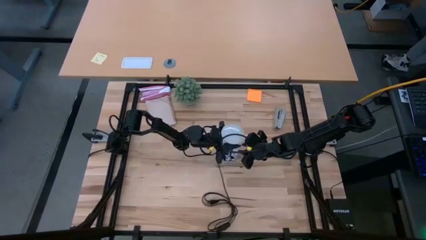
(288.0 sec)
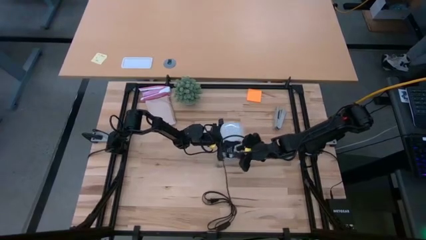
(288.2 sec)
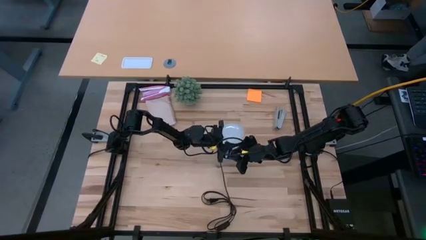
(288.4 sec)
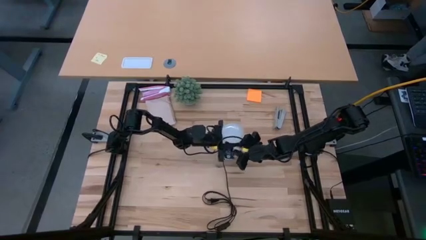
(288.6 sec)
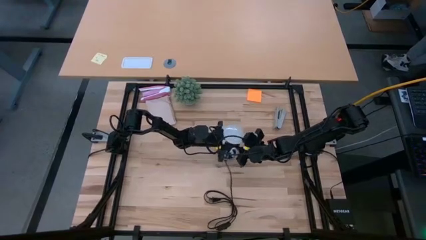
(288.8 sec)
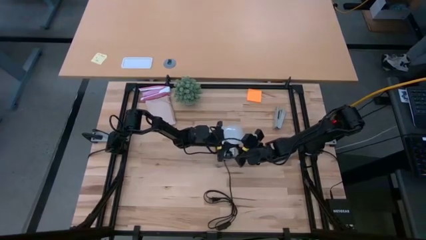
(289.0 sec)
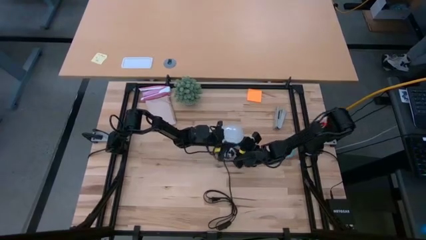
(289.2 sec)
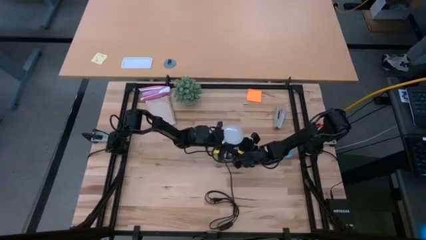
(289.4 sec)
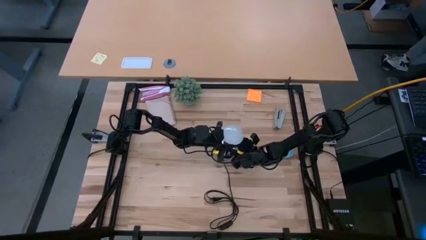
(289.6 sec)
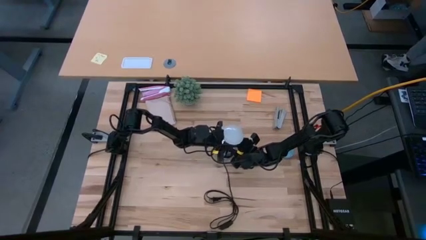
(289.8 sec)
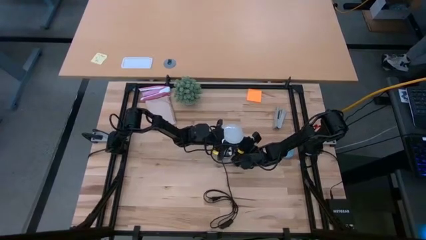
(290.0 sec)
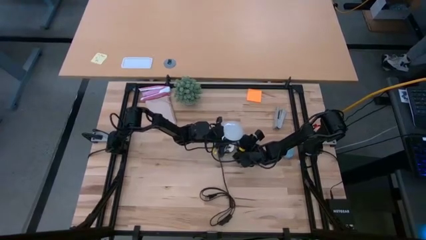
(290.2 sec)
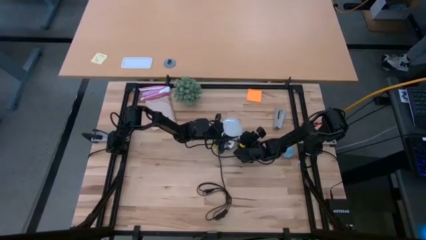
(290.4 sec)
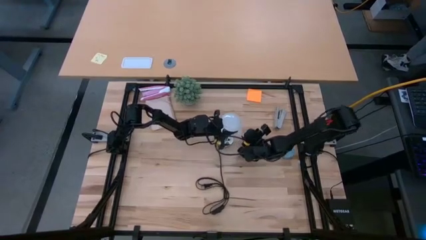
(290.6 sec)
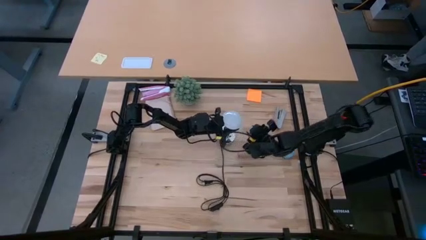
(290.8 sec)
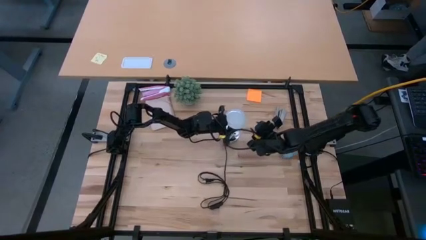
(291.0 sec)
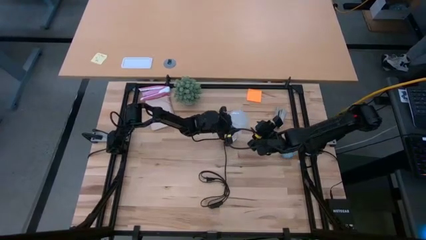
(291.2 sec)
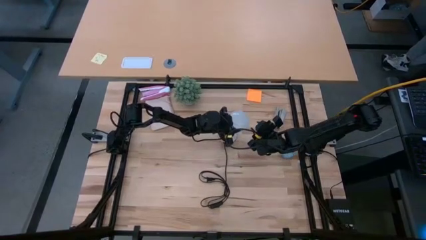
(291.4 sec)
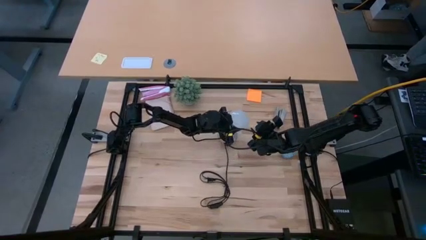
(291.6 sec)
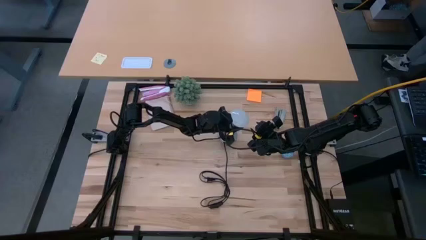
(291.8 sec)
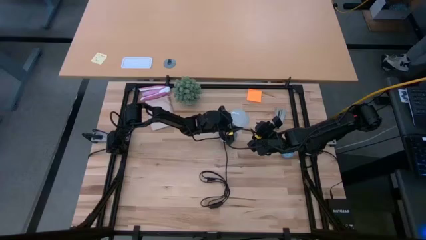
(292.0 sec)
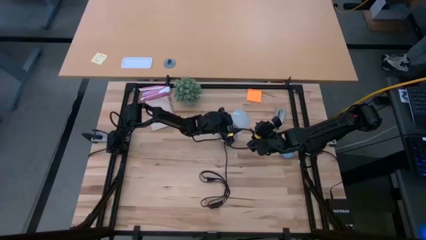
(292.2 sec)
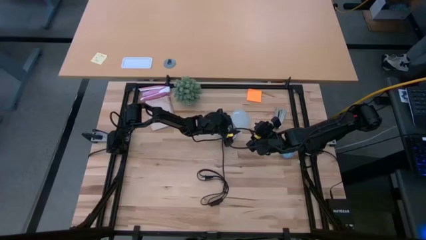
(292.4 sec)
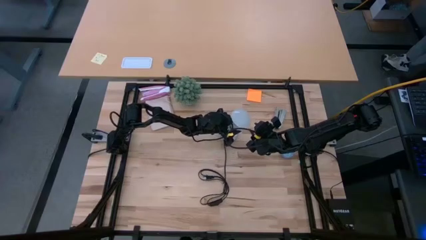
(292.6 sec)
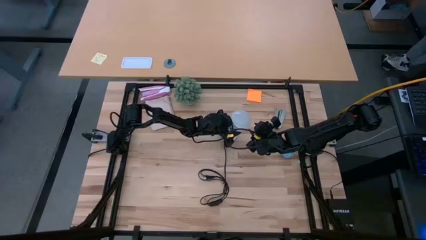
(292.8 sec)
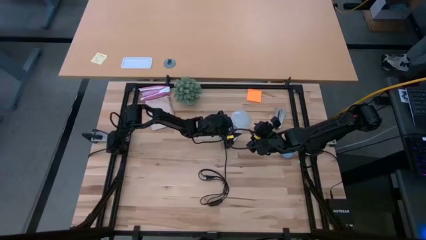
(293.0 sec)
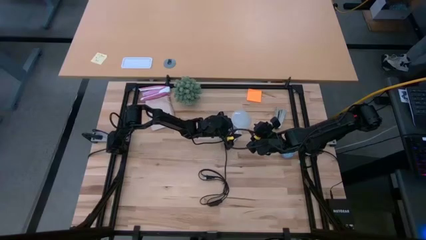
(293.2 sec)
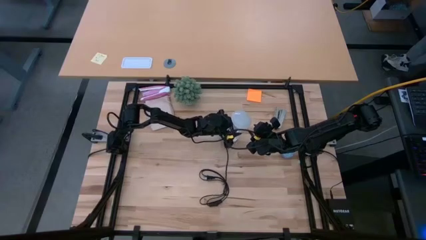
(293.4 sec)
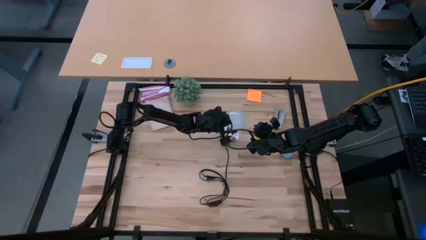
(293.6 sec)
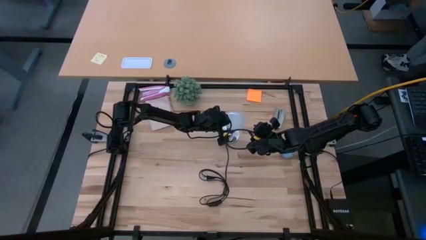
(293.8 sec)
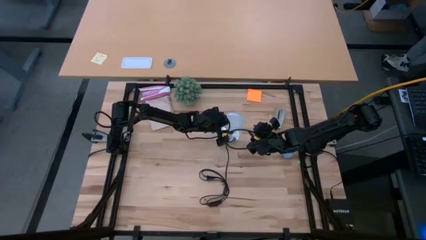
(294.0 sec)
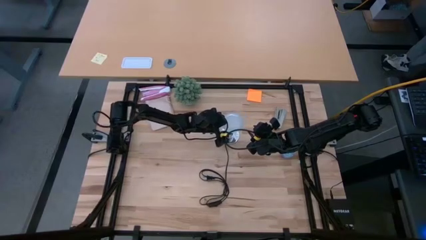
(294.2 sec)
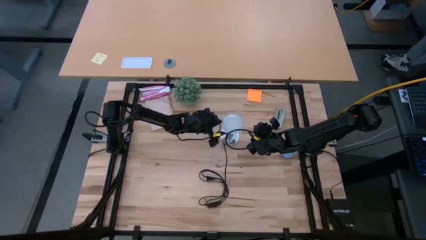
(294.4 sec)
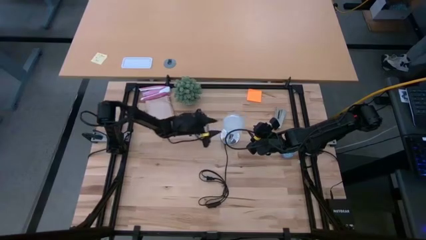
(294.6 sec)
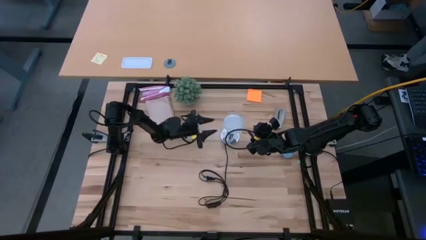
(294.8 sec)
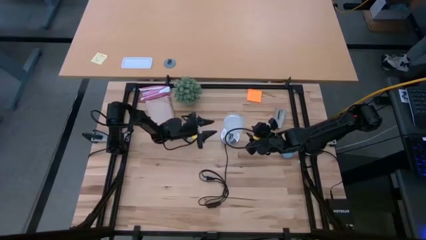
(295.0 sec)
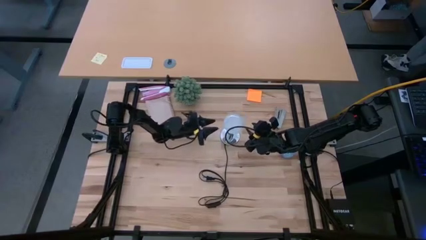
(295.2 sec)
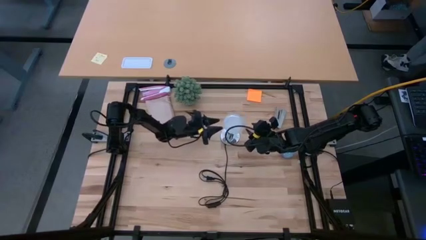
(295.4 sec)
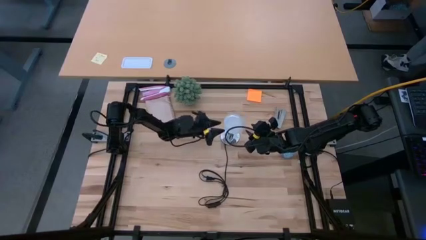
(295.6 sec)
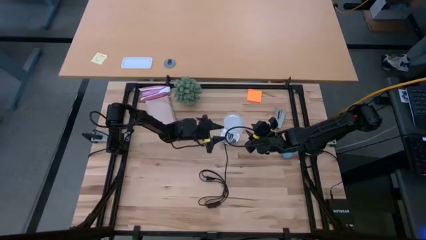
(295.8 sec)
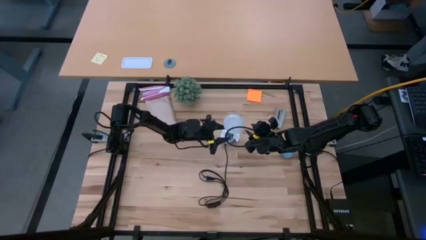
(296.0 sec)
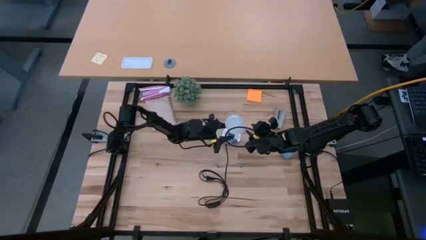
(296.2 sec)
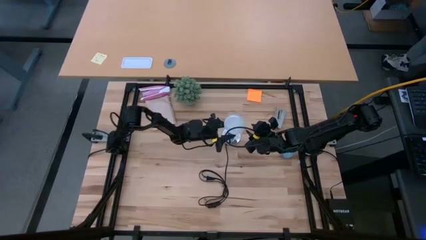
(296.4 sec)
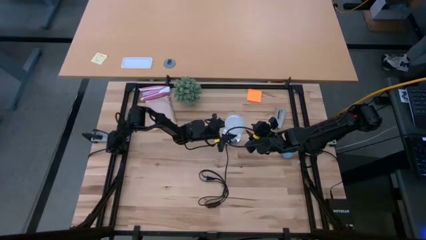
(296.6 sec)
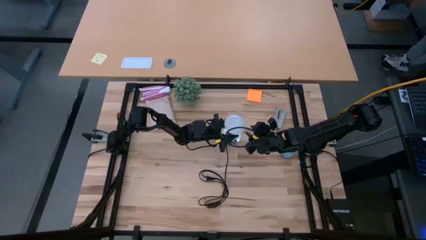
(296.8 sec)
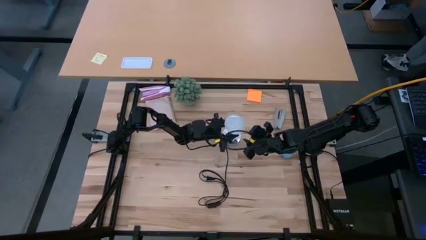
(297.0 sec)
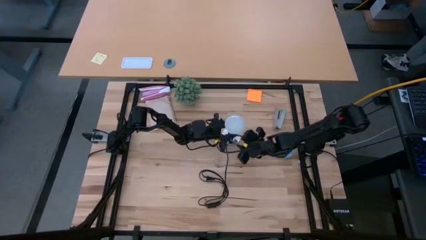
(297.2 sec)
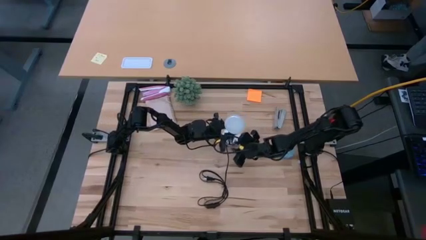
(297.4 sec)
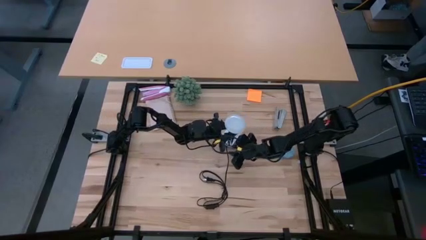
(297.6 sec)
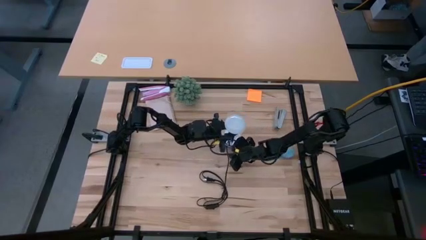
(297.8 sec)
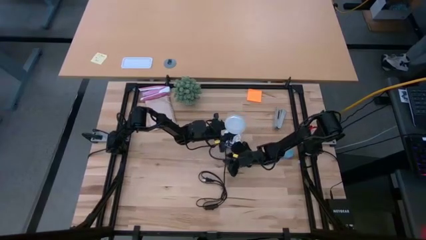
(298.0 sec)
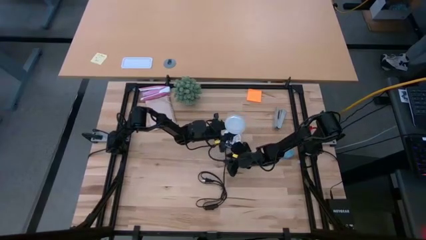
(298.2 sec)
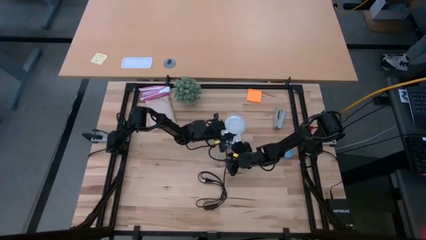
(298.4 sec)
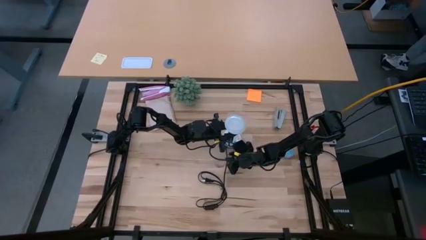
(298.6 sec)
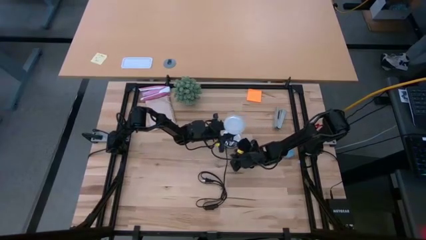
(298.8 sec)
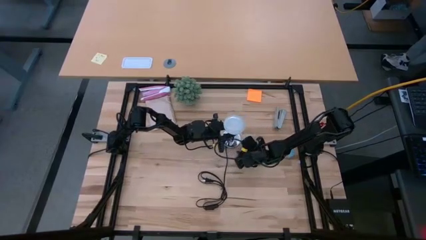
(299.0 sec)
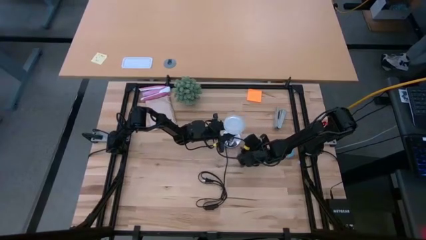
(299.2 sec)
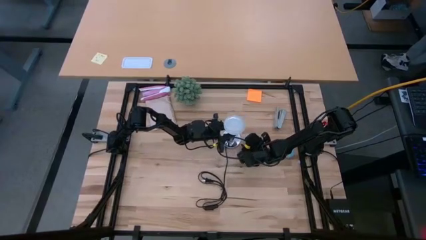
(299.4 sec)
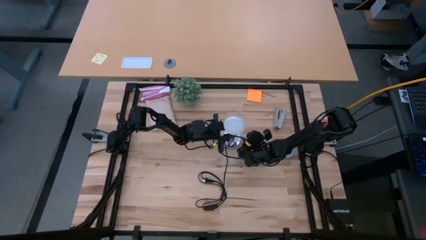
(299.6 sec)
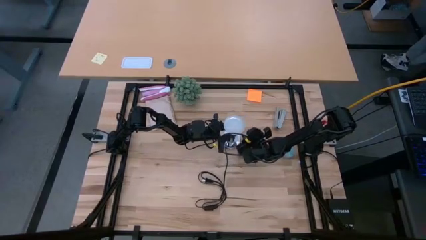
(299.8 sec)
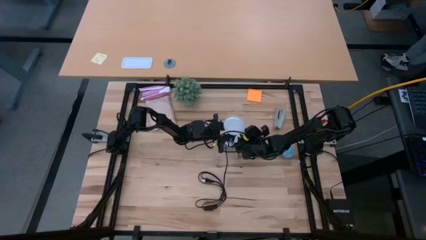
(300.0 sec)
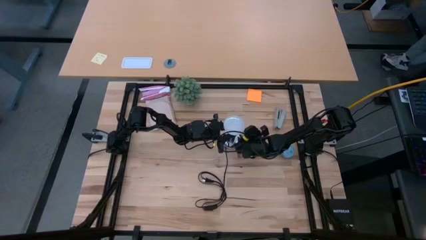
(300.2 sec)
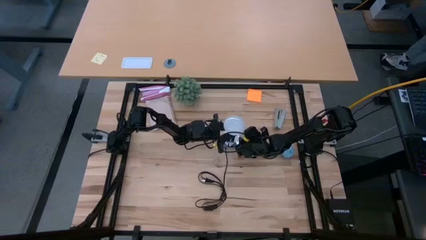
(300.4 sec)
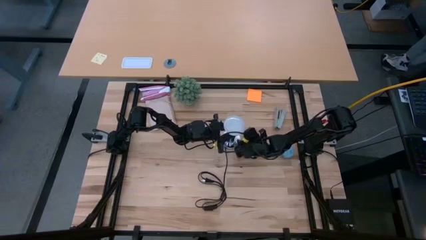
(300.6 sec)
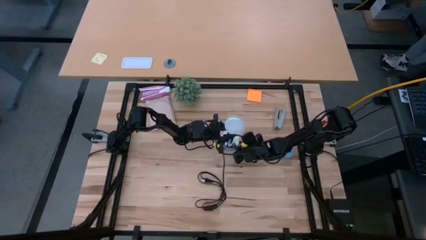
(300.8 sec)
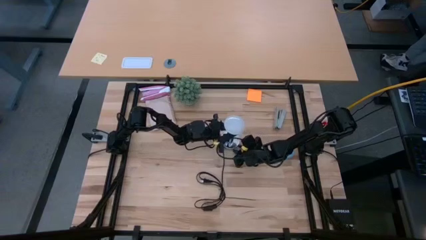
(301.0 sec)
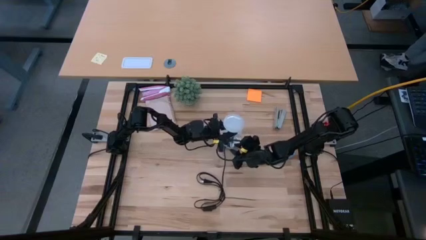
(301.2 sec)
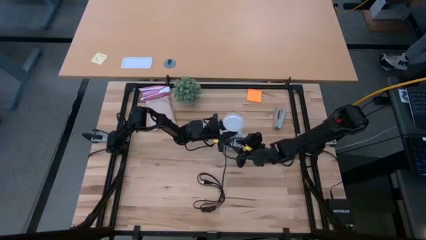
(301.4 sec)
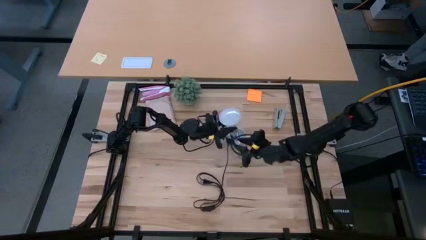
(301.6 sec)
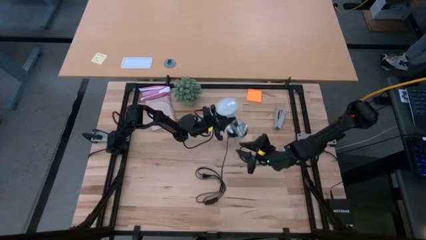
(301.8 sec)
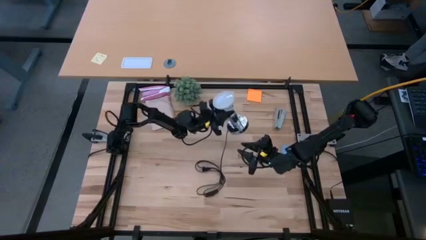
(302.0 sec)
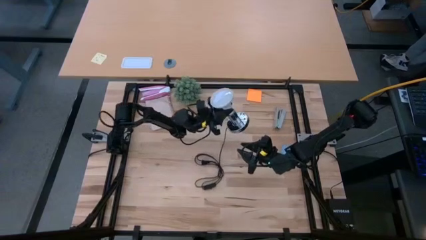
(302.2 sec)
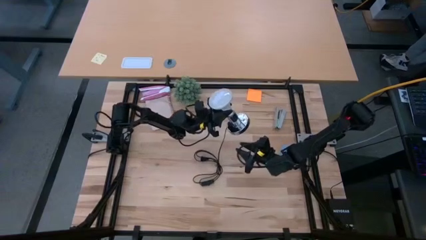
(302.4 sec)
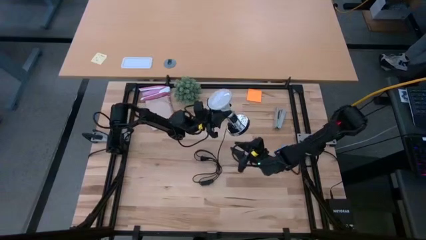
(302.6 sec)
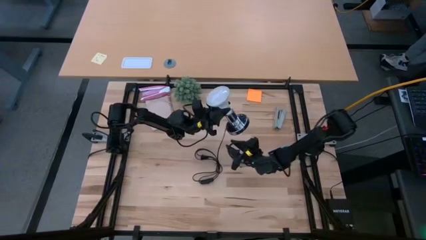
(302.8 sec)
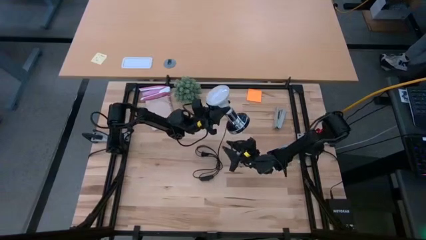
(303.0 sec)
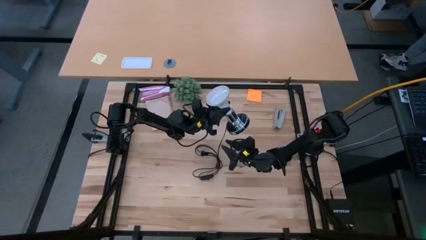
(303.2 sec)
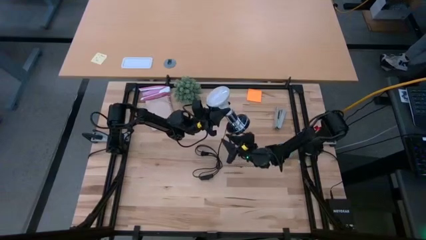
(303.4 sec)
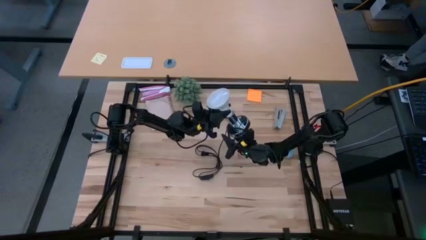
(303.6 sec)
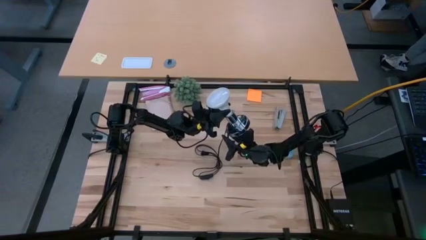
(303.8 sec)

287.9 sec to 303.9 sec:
Task: Screw lightbulb
Remove the lightbulb from the lamp
